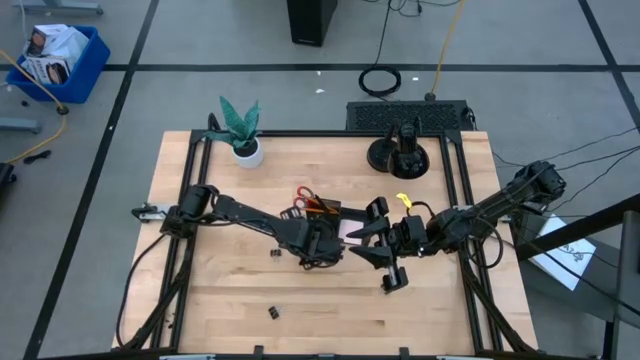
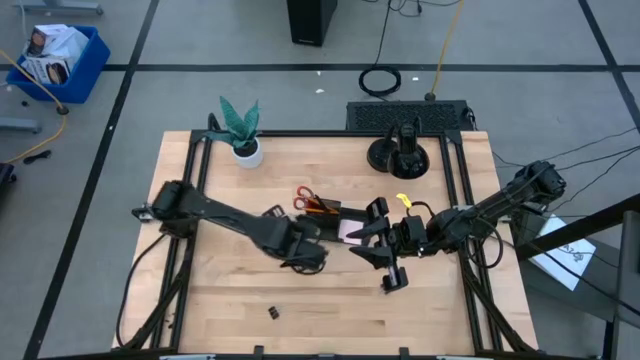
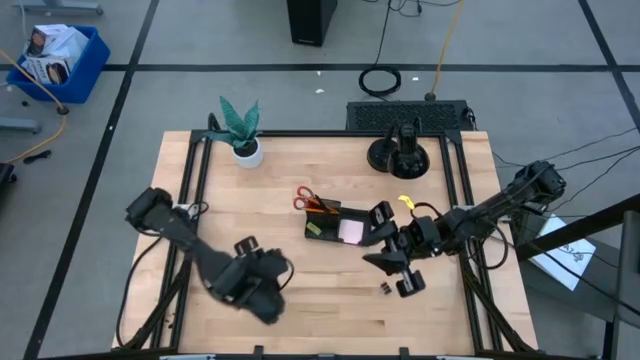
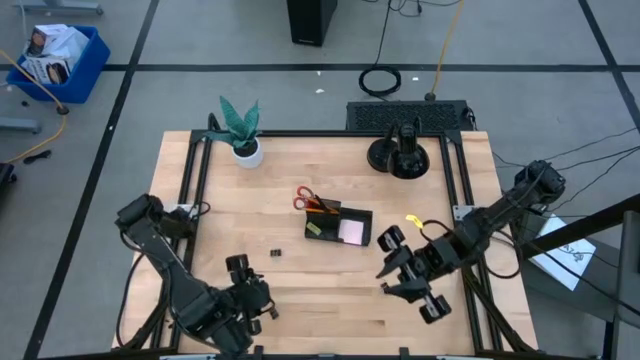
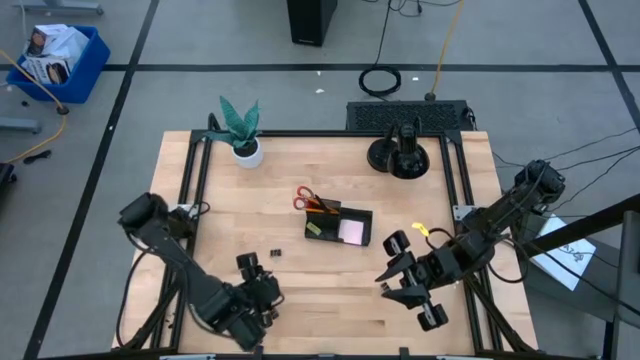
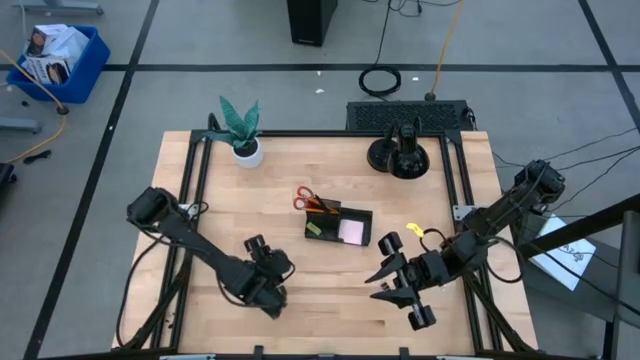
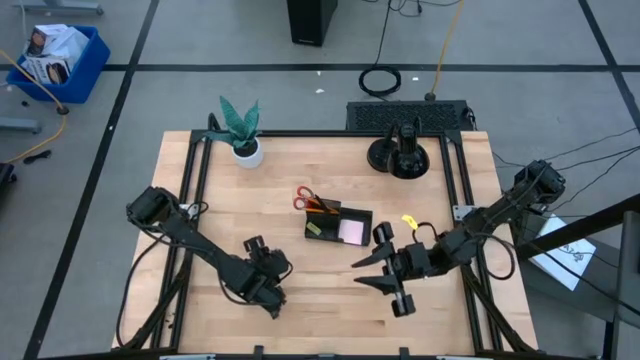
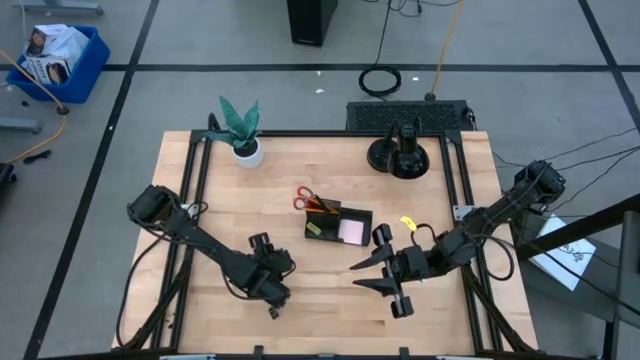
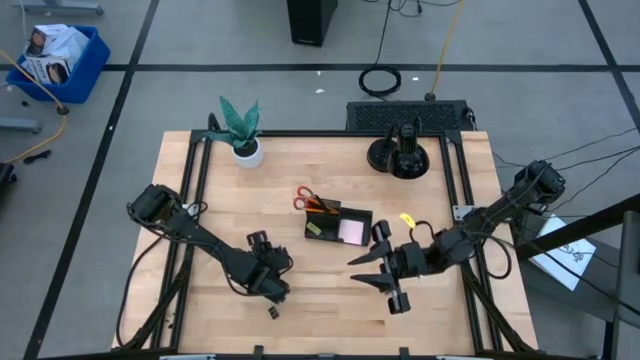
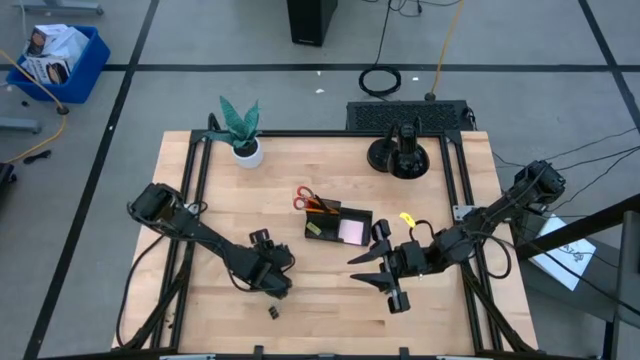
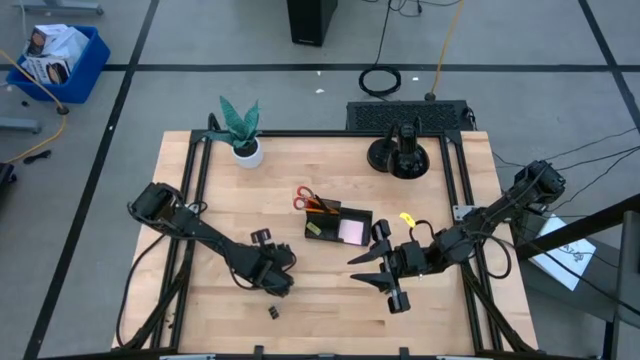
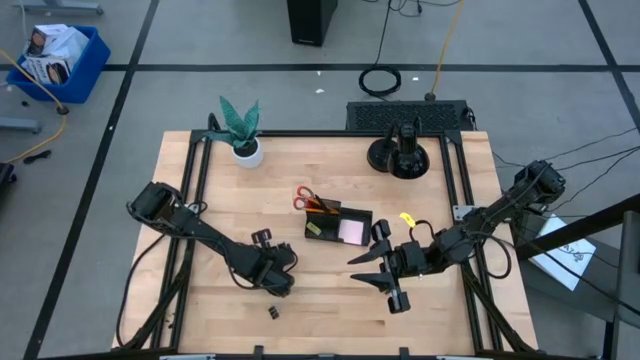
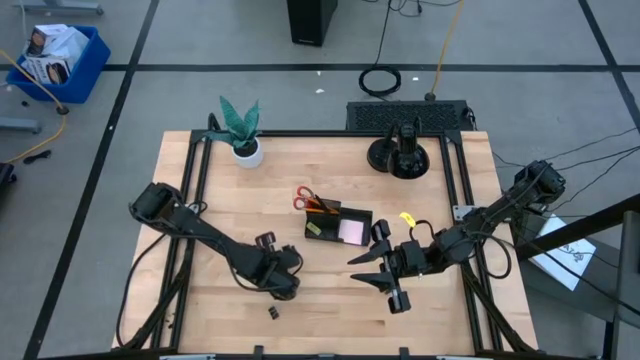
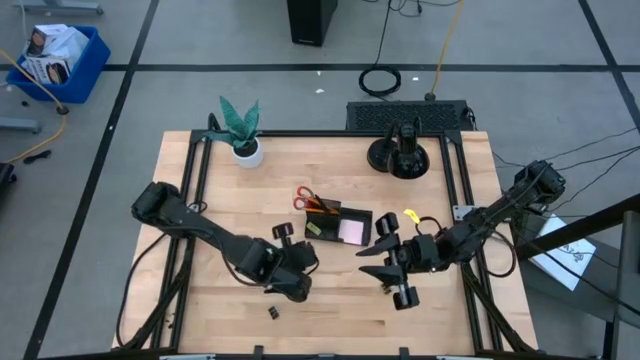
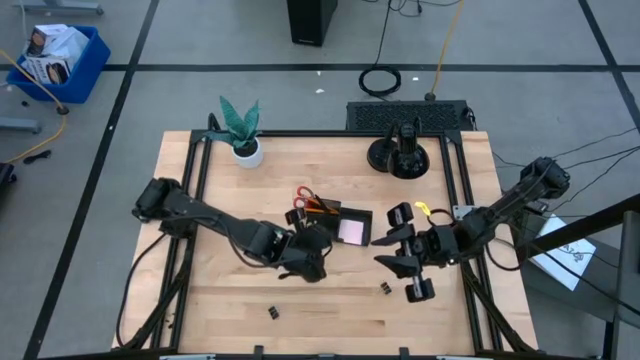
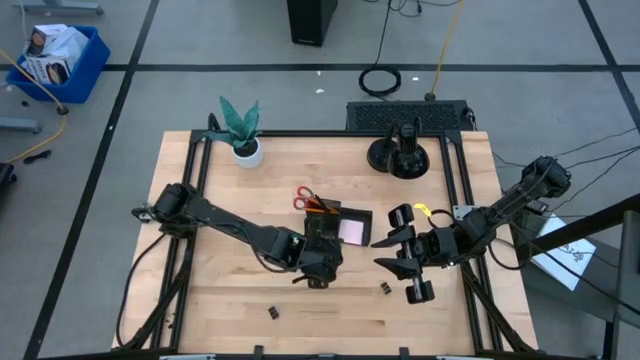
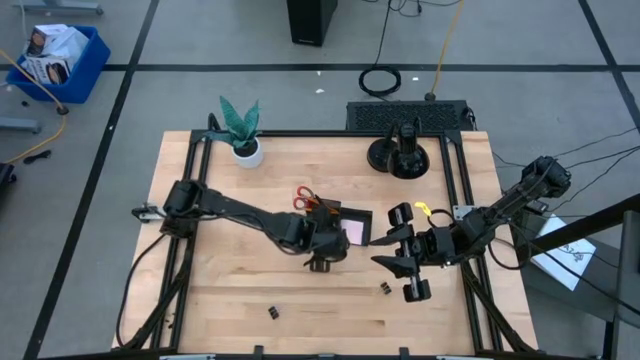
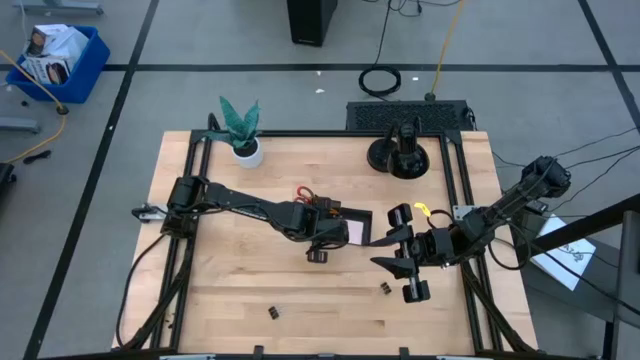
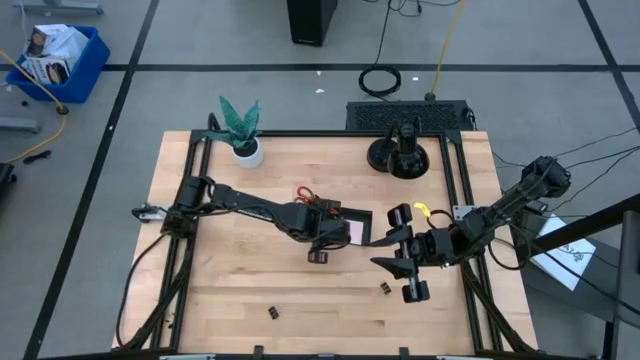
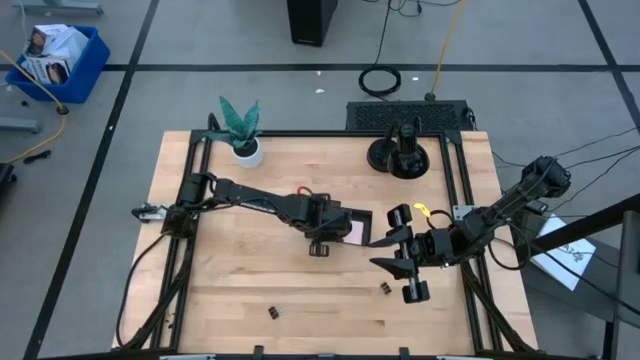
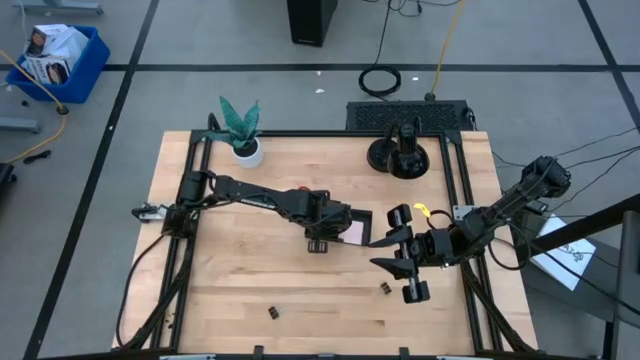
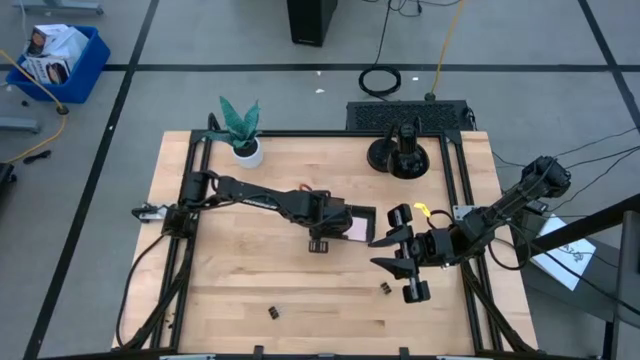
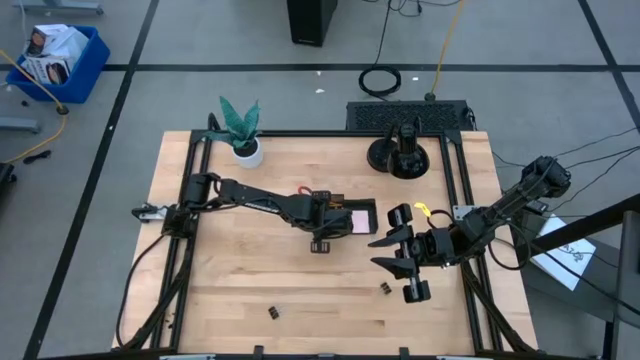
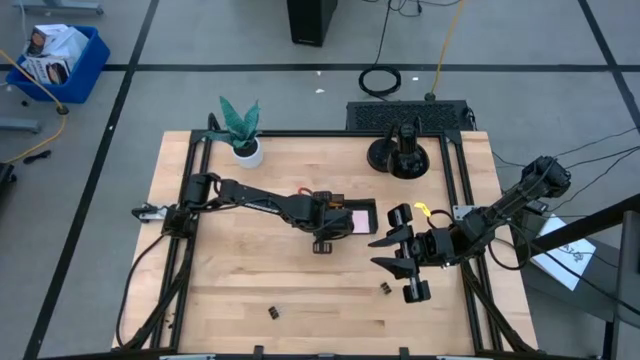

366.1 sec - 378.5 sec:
Task: Pick and place office supplies into organizer
Put the top left black binder clip into the desk organizer

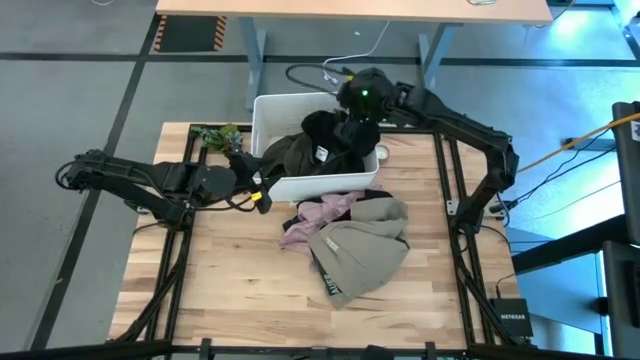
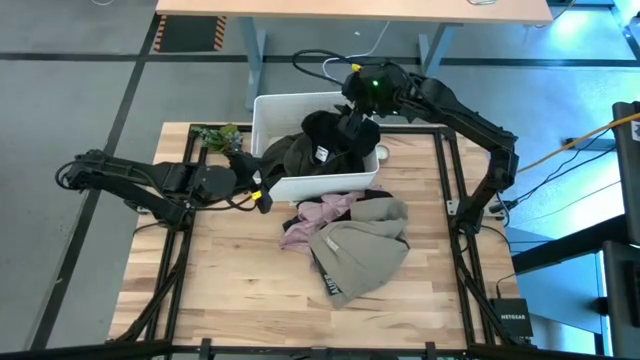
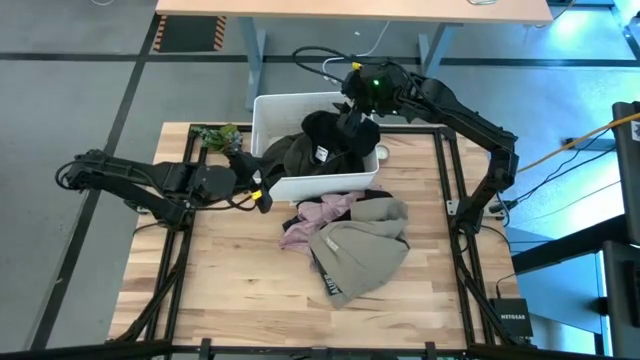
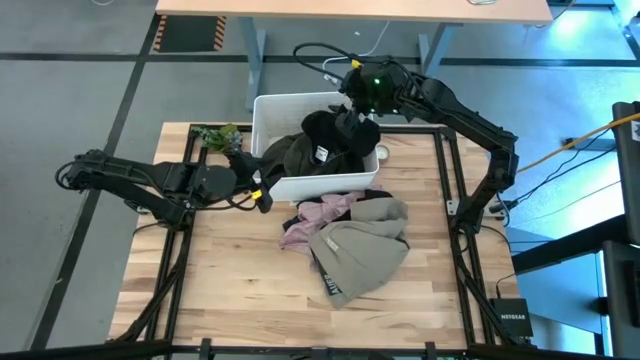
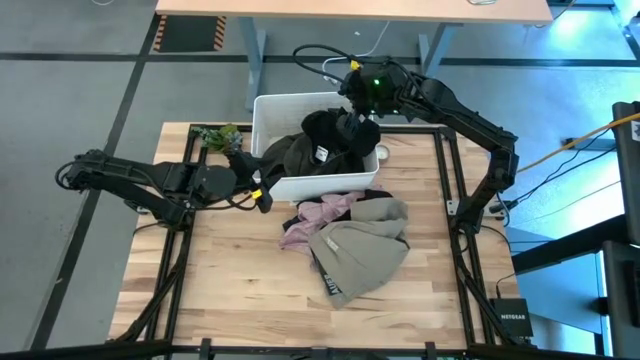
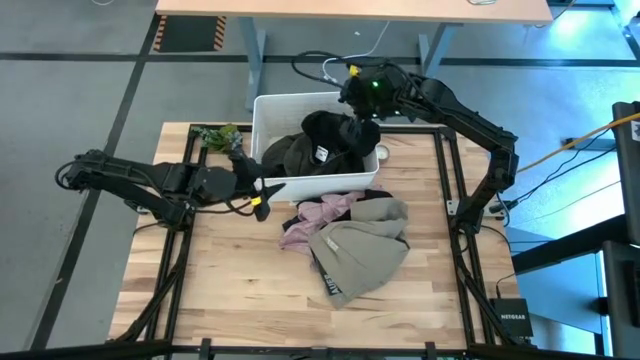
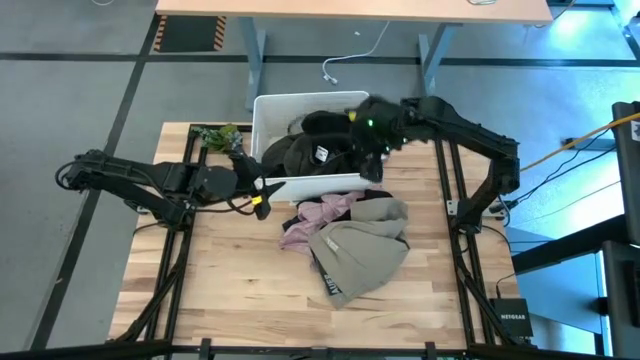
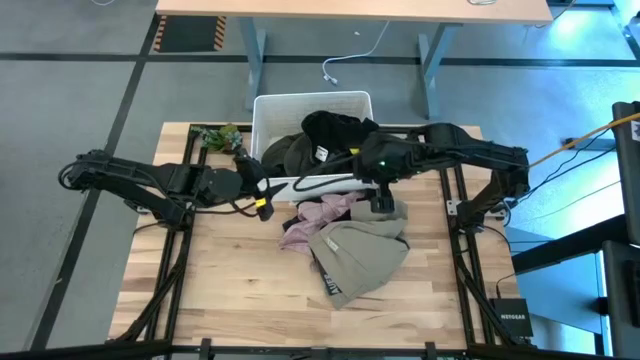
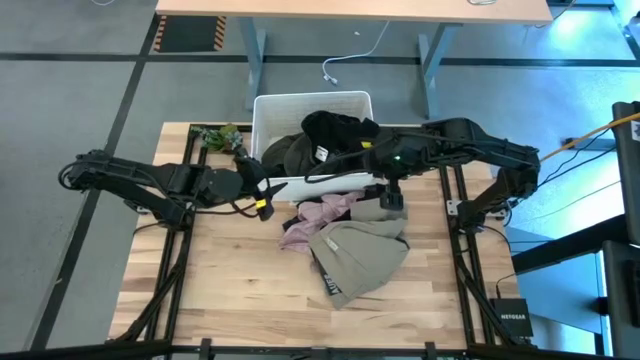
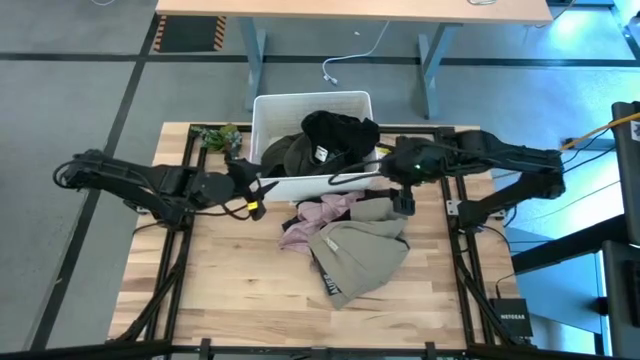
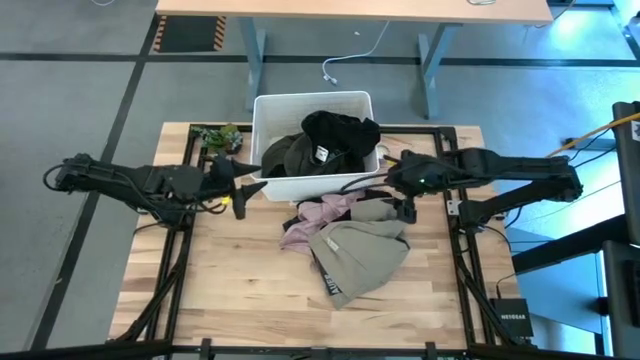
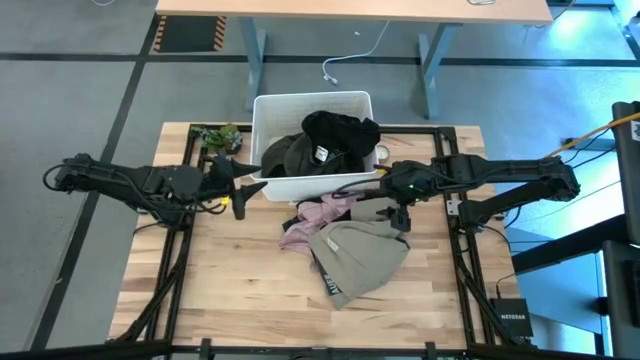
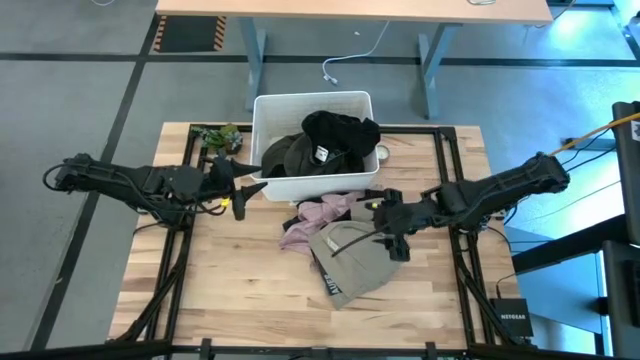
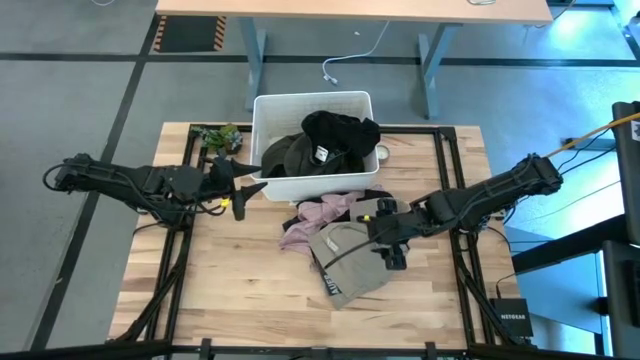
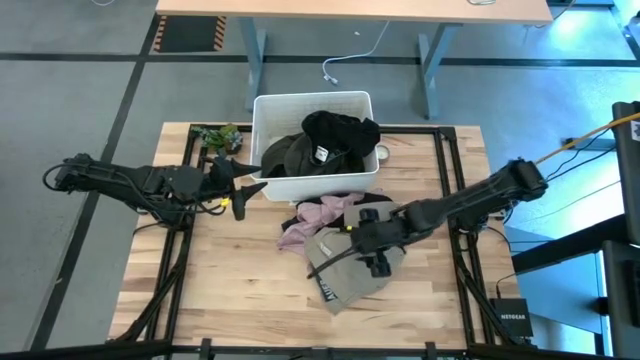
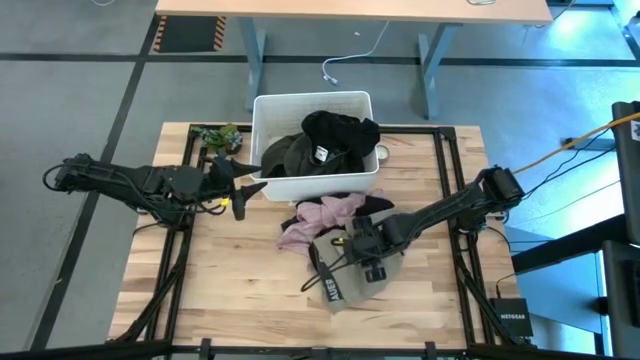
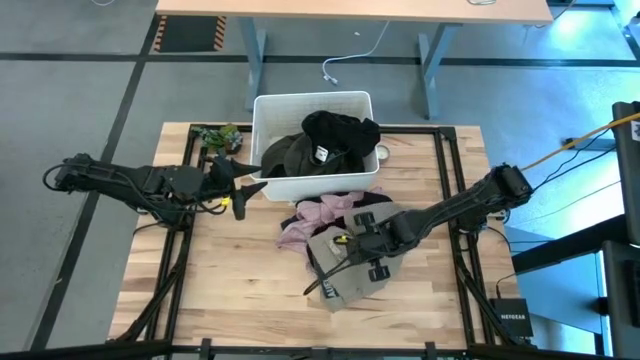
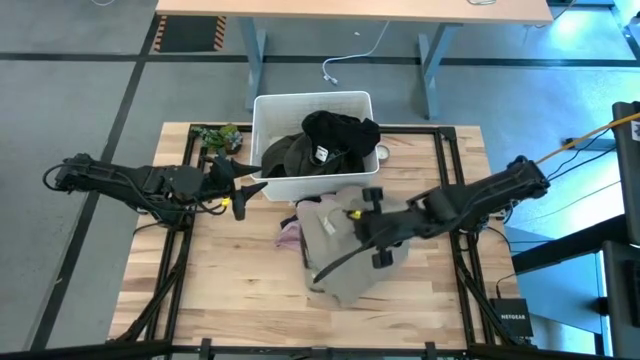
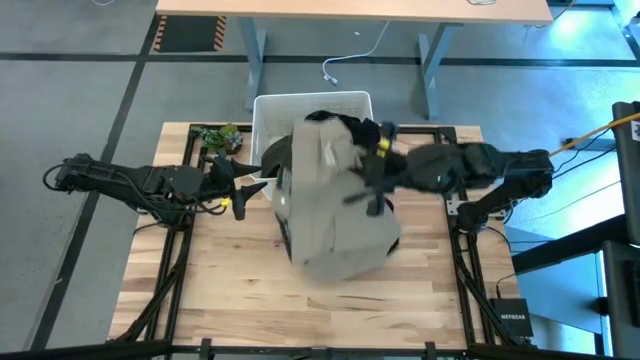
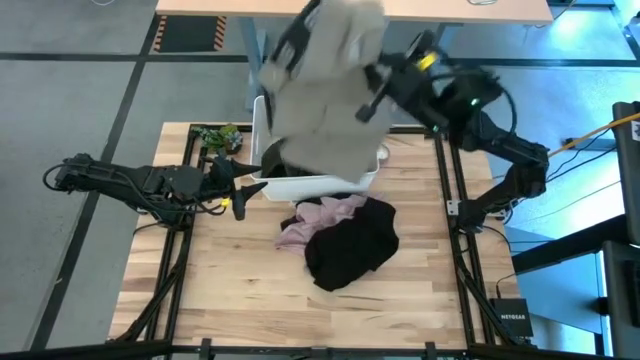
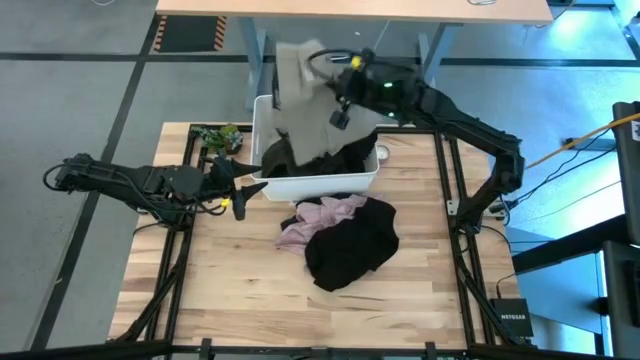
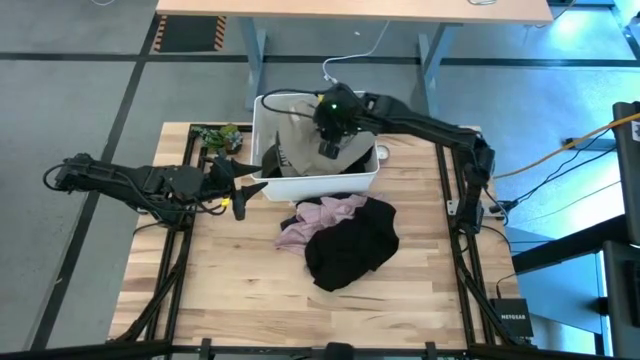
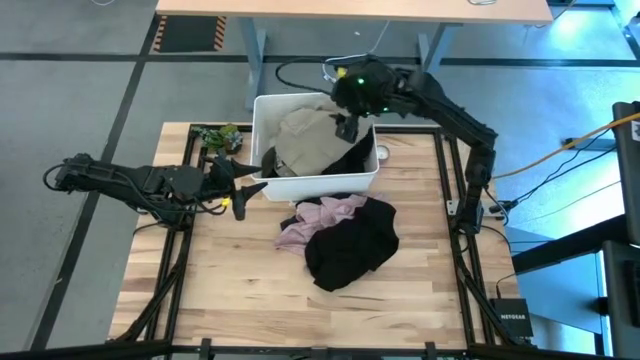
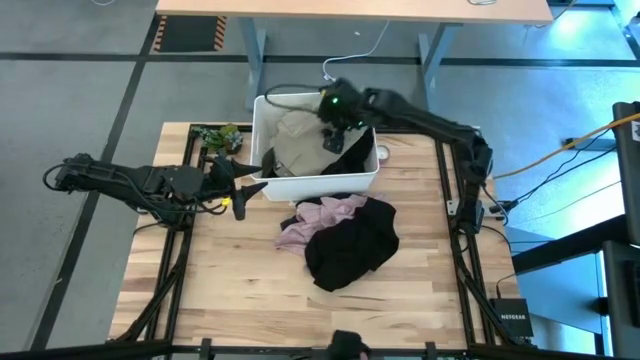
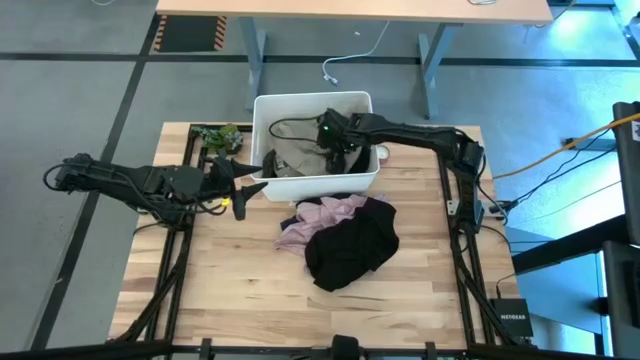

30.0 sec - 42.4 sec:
Task: Sort clothes
Put the brown shorts into the white bin
